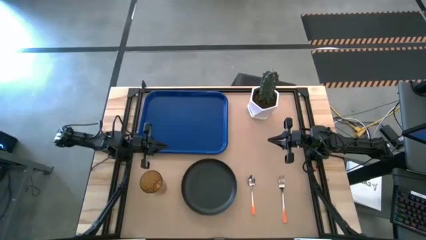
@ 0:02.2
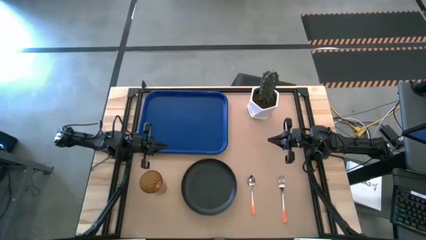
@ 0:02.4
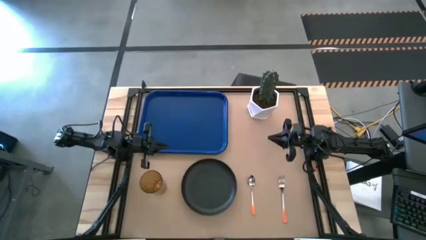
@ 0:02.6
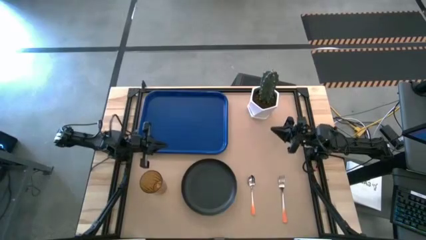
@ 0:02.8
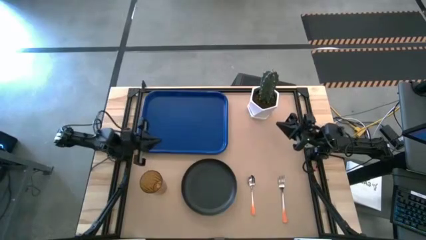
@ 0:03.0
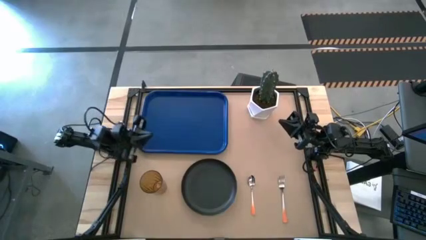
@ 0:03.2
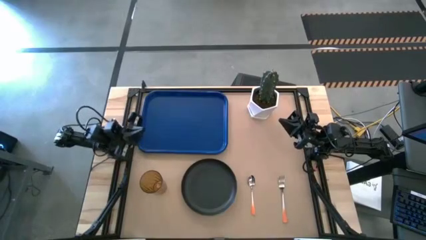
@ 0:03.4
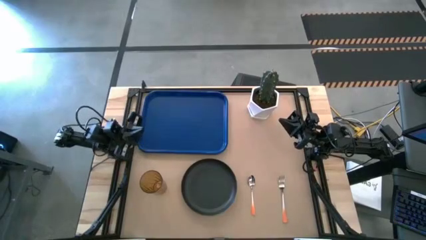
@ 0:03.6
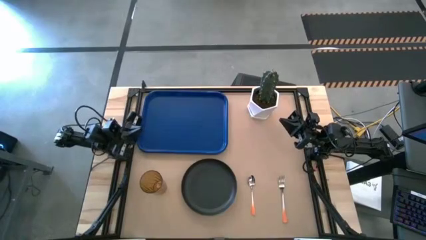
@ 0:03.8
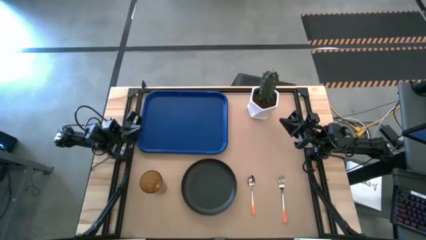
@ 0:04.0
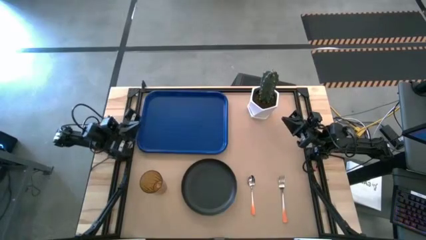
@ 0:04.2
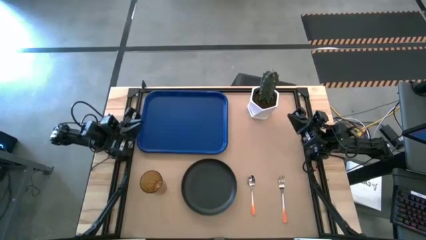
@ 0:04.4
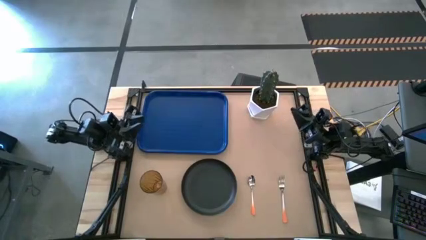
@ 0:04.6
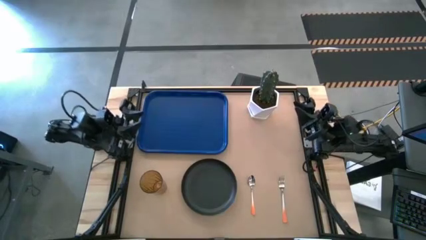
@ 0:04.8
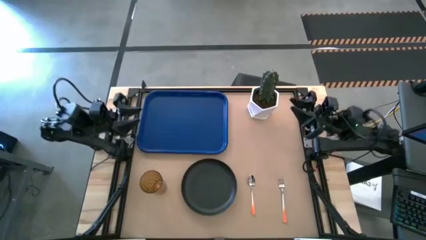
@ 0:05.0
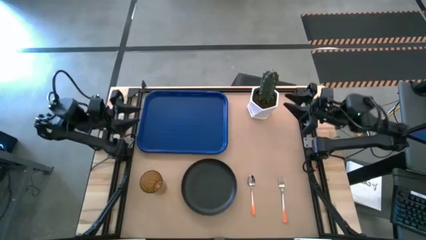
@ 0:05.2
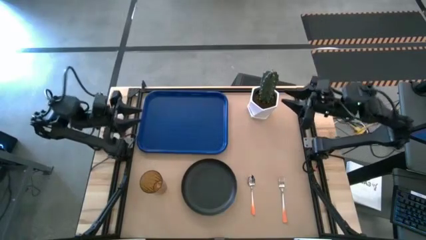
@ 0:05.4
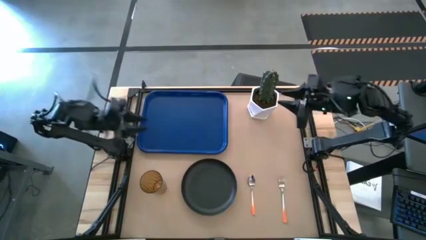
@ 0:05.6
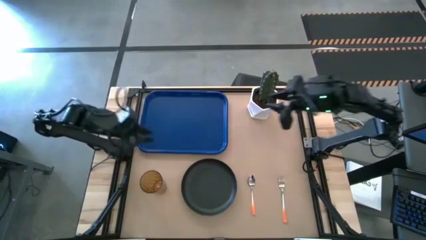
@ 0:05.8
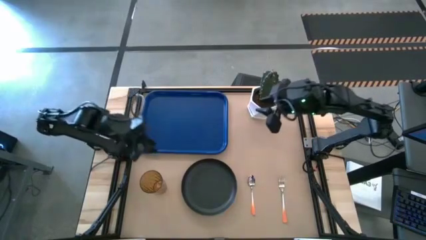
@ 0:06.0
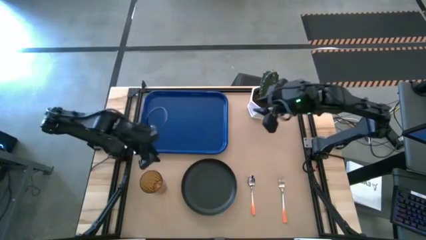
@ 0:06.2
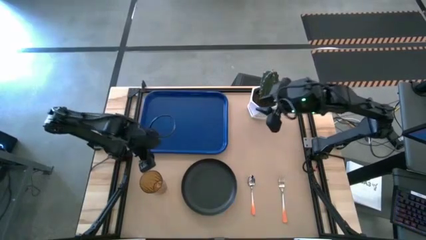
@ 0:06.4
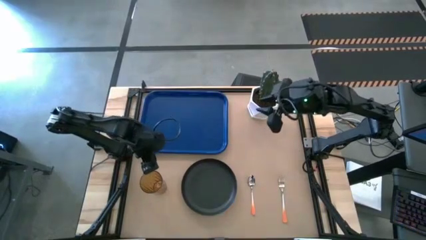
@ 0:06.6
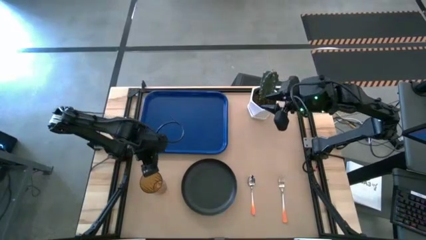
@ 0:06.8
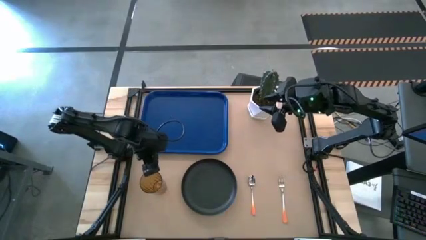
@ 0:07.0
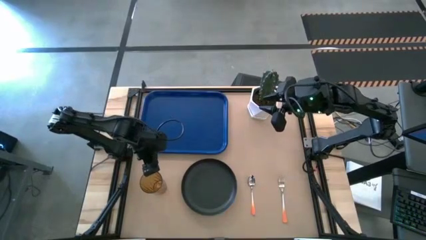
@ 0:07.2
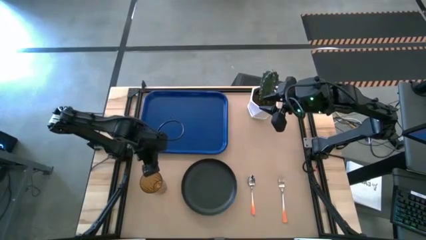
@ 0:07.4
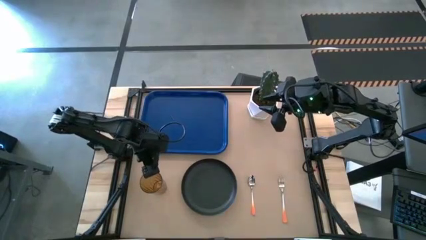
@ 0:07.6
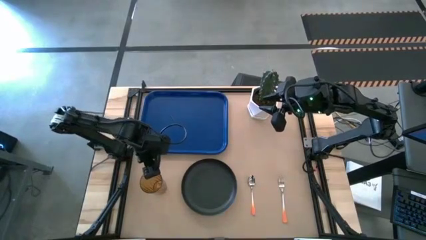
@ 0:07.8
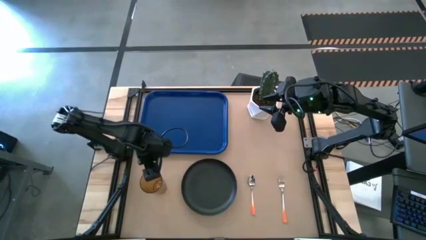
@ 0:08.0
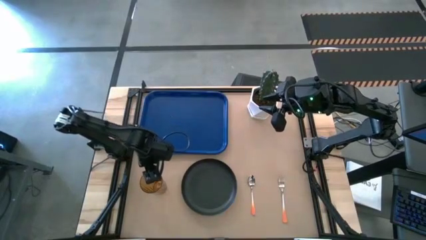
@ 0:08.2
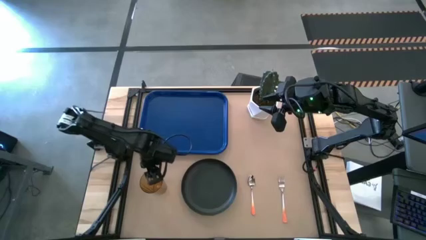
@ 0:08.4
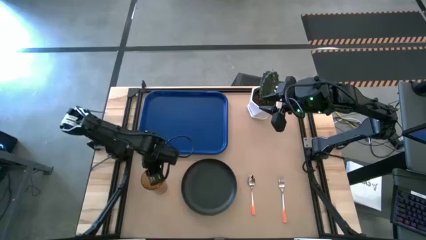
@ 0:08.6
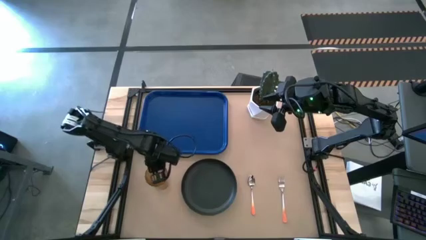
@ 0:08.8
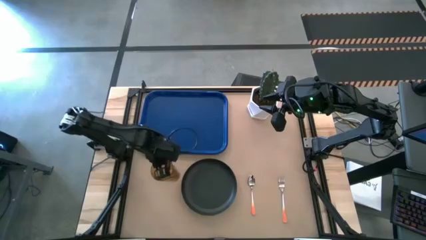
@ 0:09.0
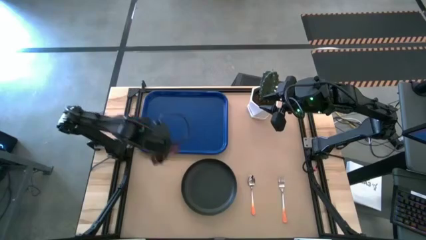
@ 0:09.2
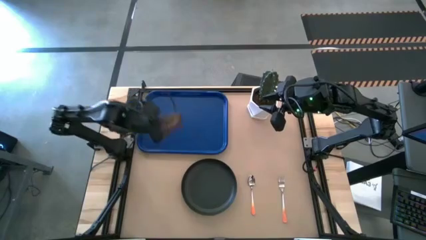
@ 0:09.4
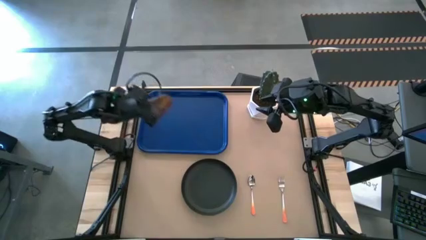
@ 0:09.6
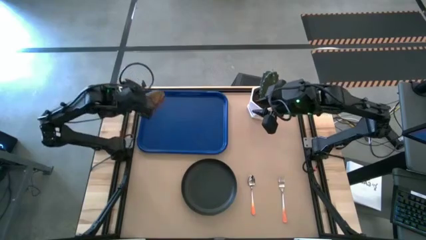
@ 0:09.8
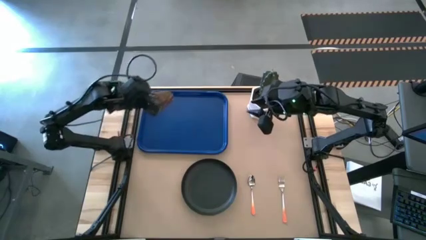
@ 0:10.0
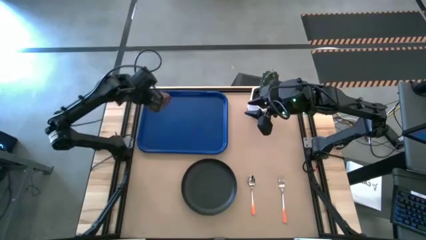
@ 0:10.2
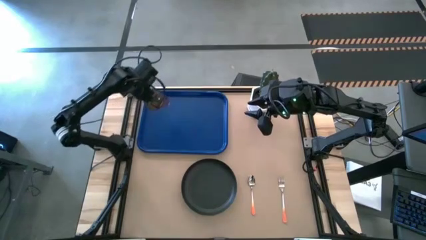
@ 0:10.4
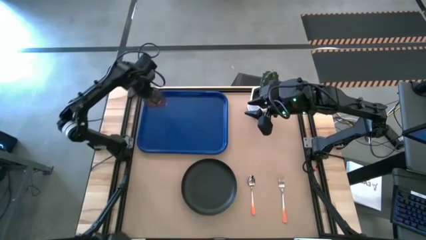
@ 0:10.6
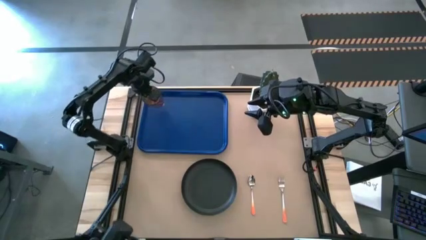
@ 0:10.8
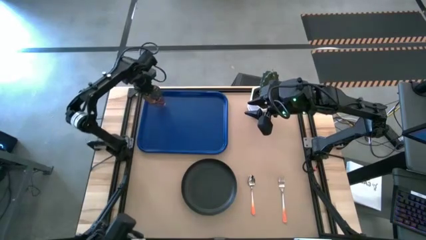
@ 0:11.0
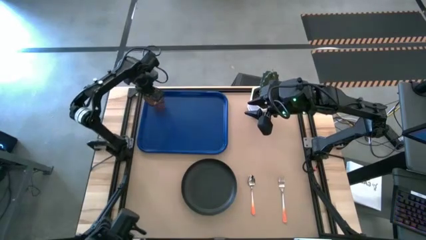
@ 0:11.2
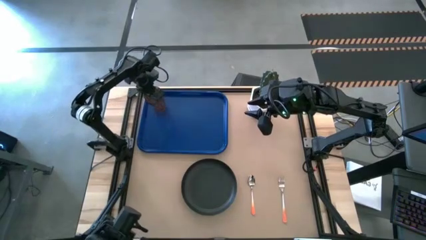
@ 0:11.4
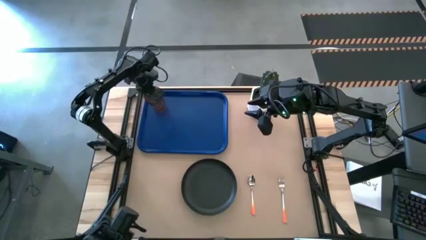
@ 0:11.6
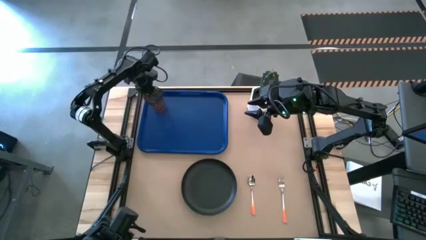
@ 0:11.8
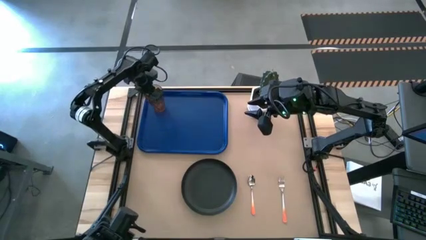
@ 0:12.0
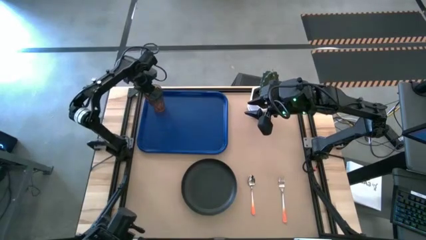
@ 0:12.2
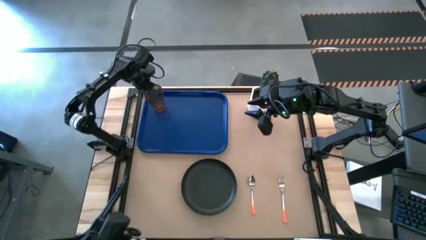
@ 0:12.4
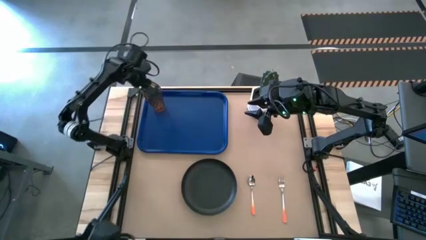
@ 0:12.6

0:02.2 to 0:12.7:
Task: Pick and place plate/cup/fork/spoon on tray
Put the brown cup on the top left of the blue serving tray
